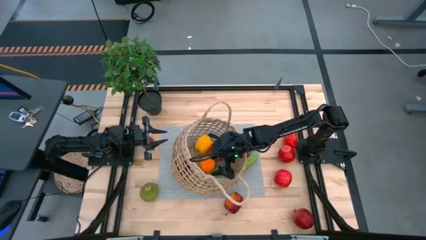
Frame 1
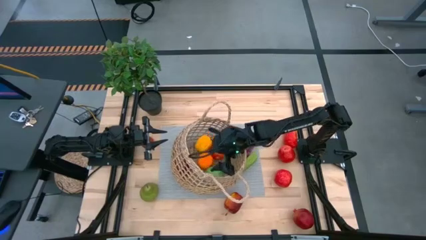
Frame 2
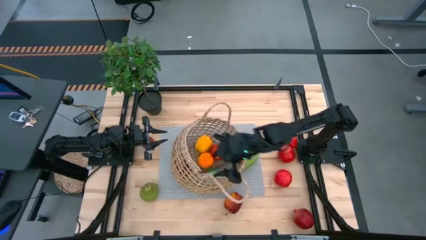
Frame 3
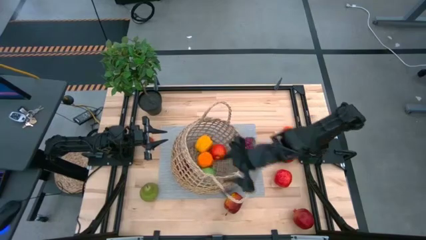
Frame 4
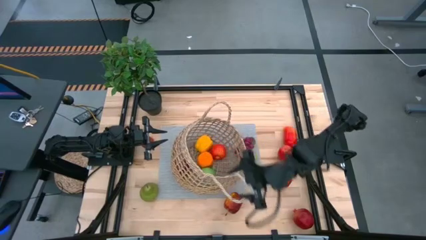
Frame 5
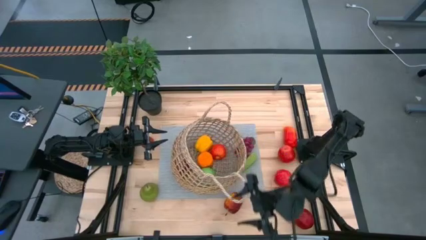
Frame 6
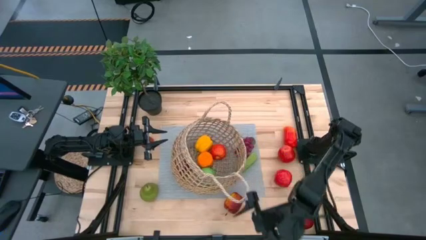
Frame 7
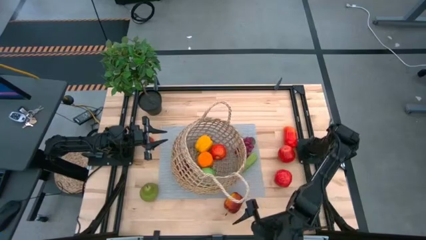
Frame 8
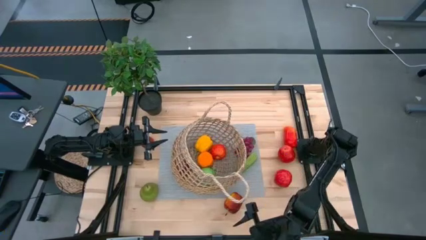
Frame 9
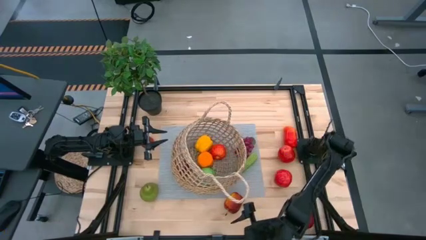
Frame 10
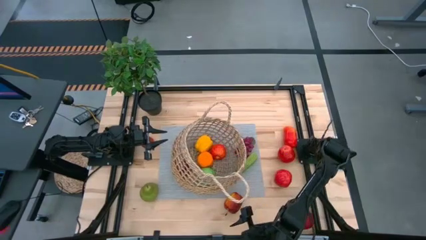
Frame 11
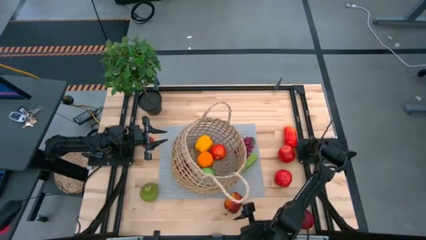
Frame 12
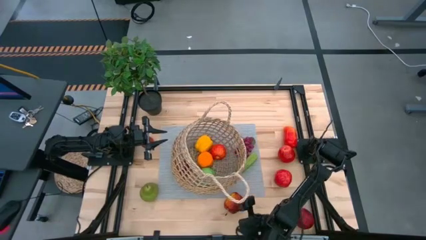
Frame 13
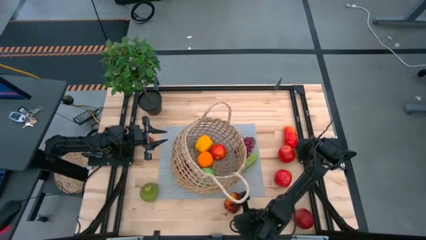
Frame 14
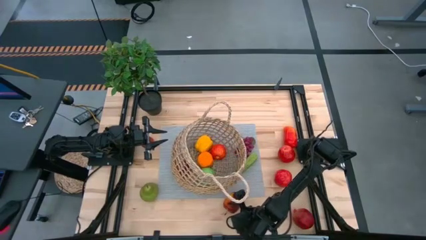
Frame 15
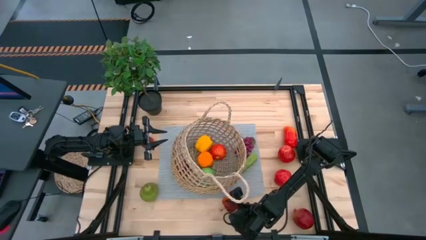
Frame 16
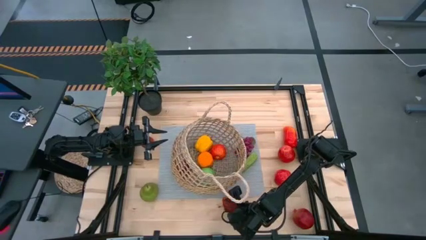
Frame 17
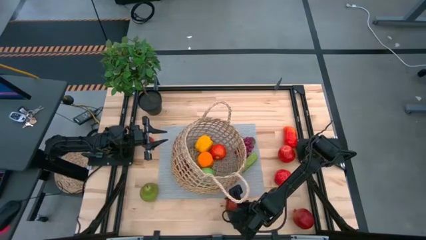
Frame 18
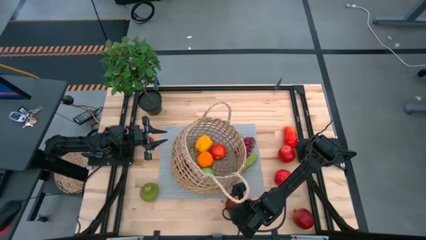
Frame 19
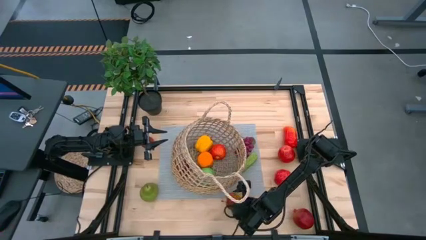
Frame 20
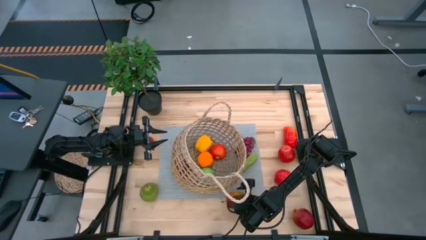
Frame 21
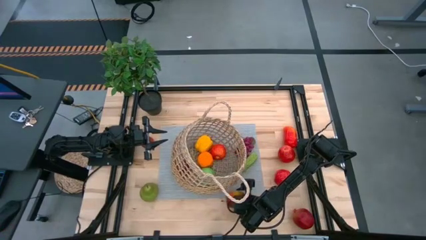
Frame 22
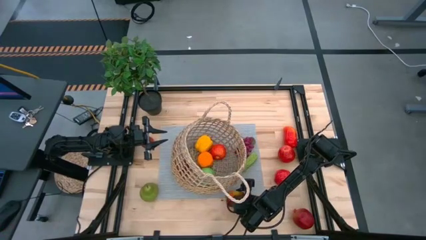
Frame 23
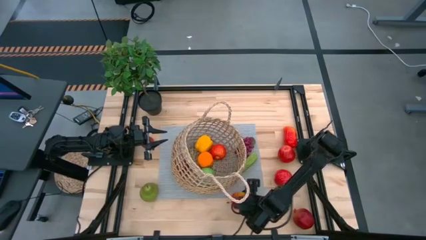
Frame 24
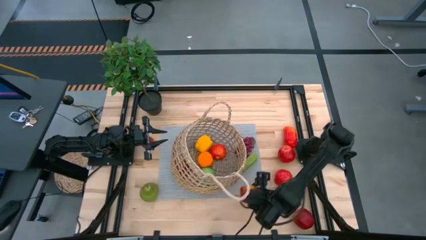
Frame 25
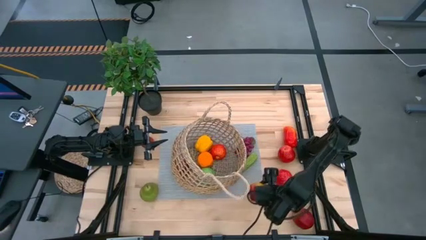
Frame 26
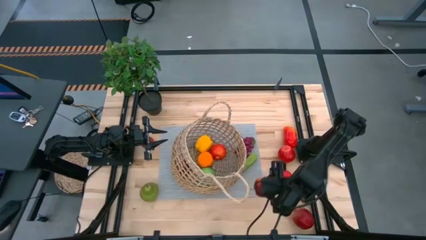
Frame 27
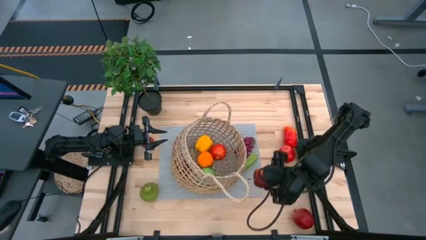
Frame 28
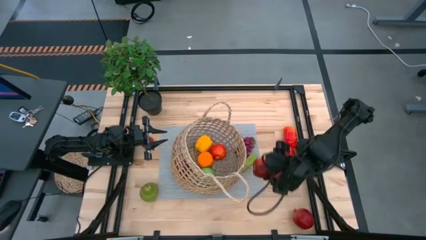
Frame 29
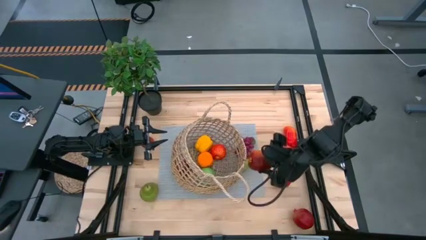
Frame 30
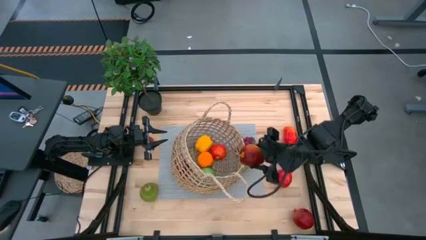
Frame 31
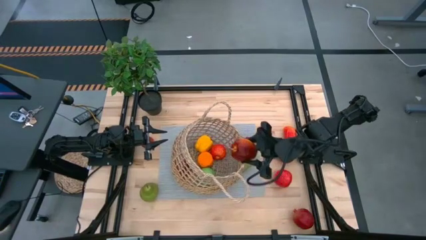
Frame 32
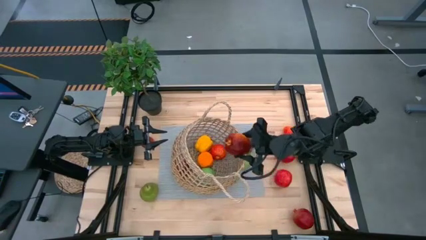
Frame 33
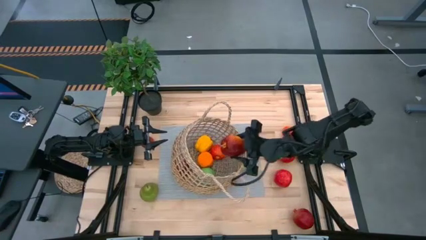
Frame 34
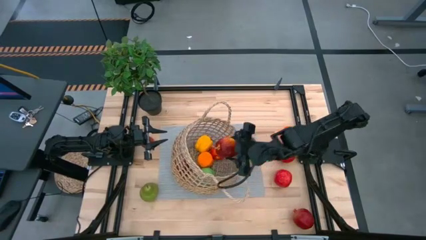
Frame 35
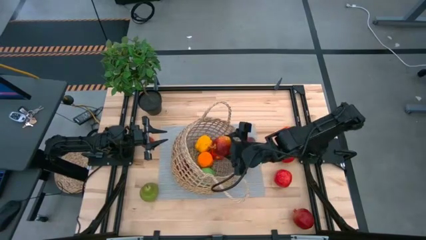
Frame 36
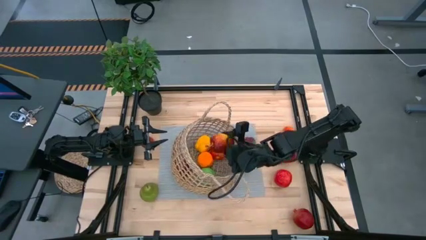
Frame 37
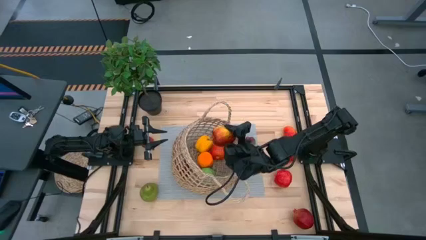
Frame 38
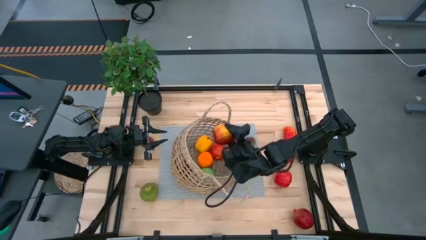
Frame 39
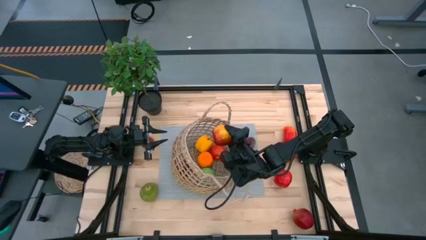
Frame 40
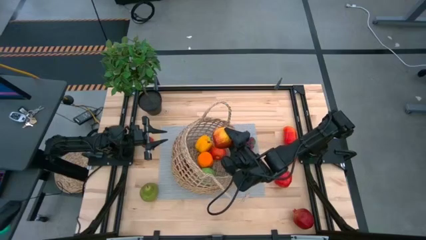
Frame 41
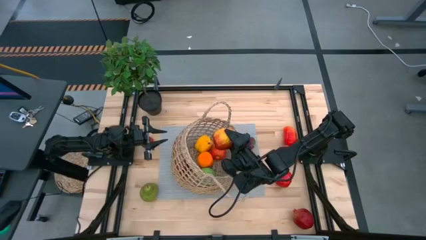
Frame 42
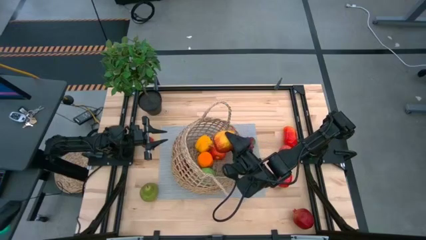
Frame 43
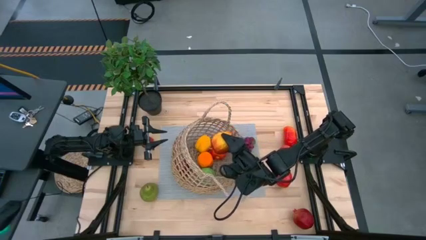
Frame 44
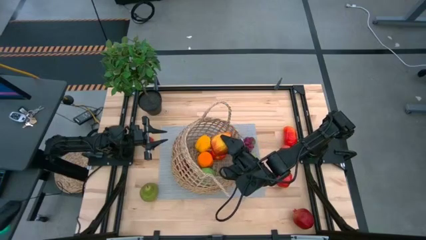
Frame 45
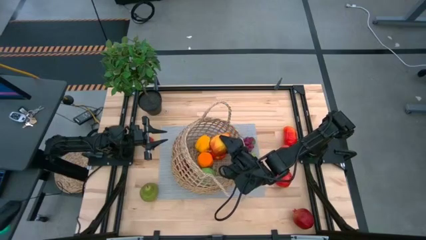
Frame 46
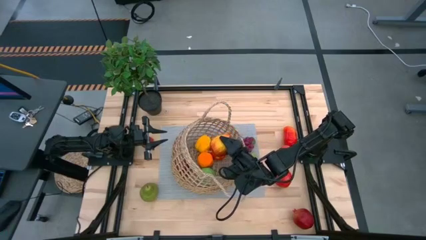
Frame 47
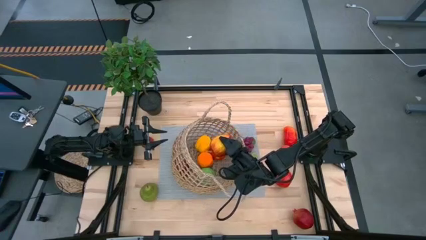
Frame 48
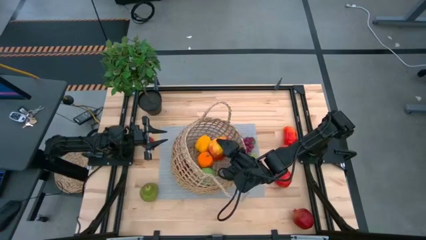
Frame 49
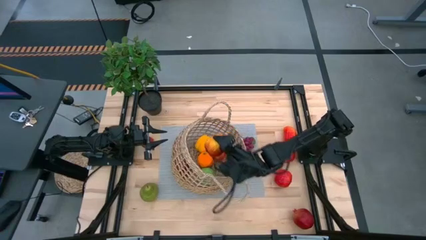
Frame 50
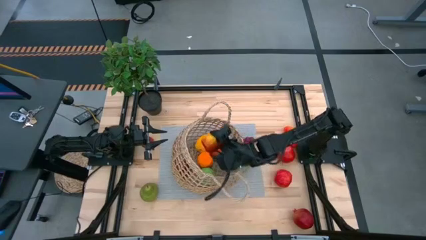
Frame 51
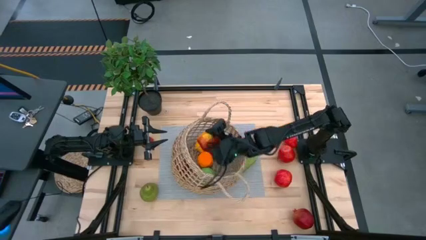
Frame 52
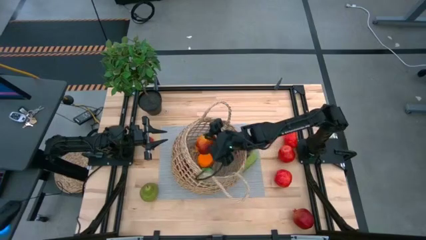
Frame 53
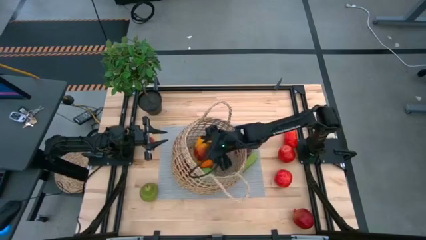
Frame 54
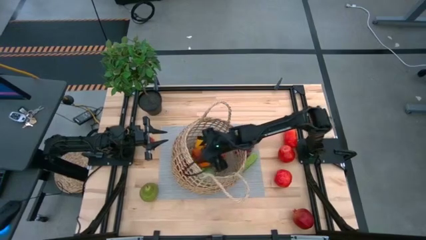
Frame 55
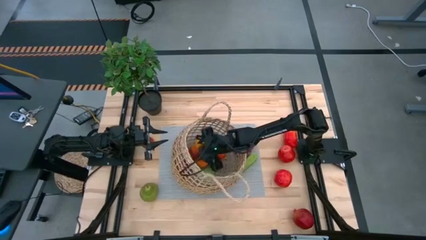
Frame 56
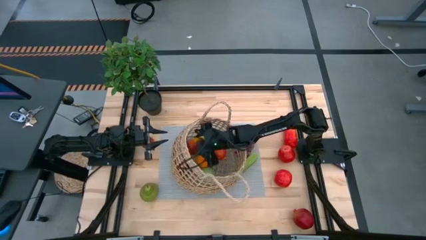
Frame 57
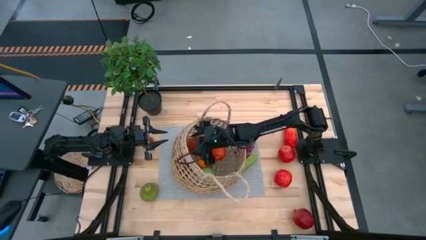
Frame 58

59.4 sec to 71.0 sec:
Task: Build produce basket
Put the dark red apple into the brown basket

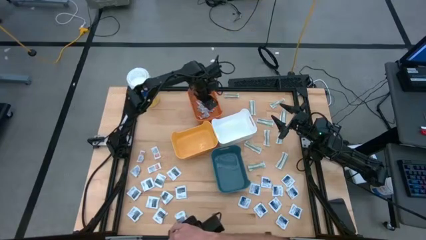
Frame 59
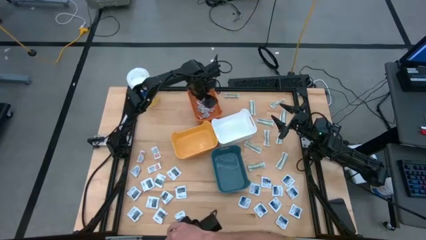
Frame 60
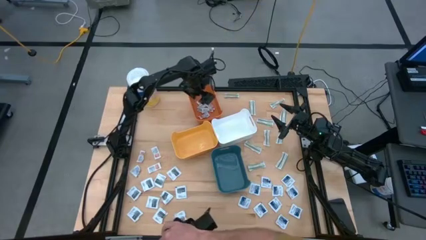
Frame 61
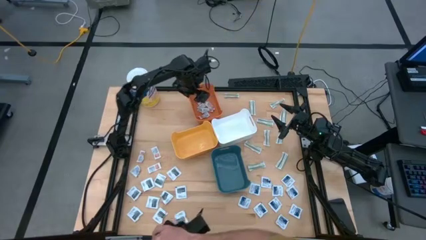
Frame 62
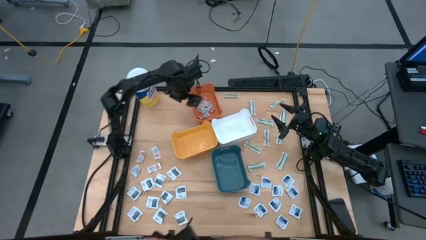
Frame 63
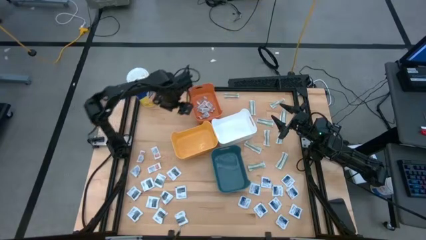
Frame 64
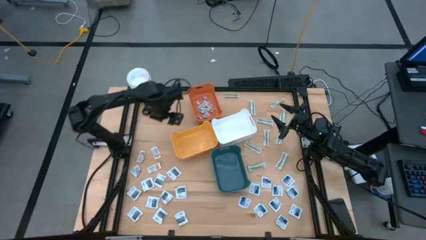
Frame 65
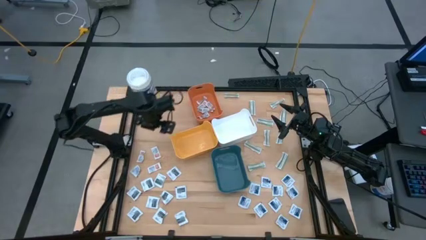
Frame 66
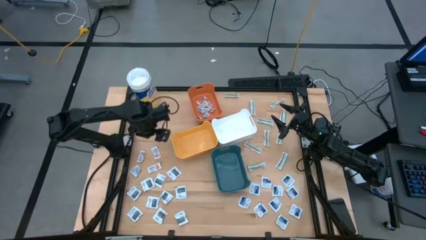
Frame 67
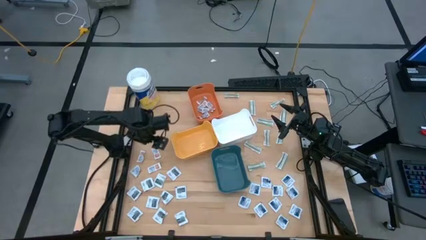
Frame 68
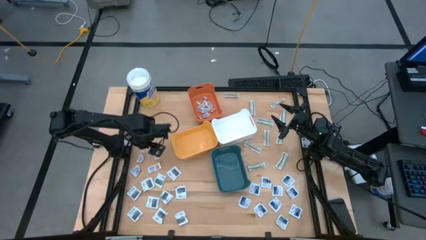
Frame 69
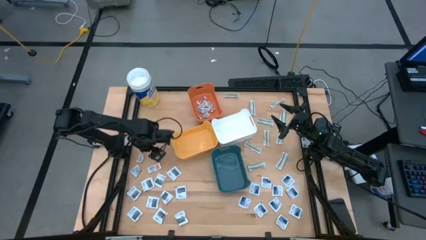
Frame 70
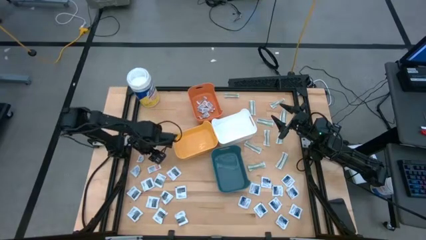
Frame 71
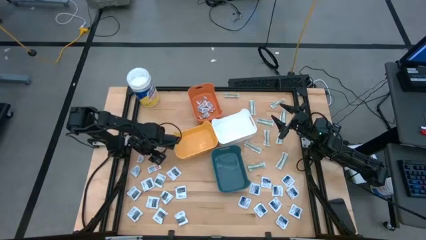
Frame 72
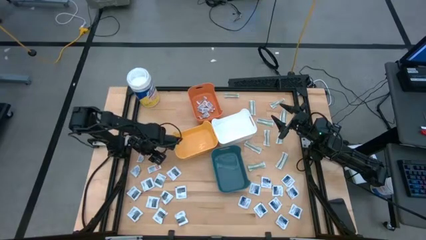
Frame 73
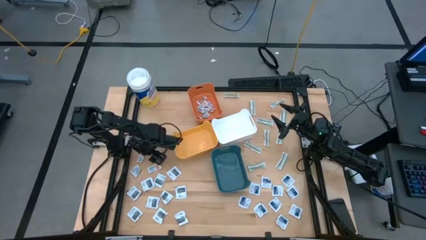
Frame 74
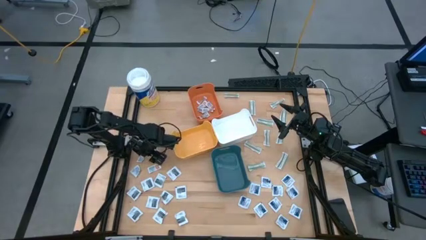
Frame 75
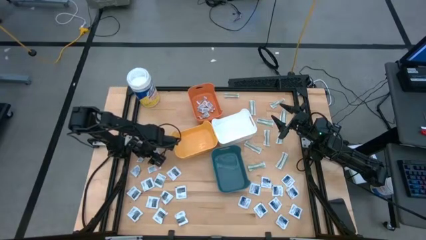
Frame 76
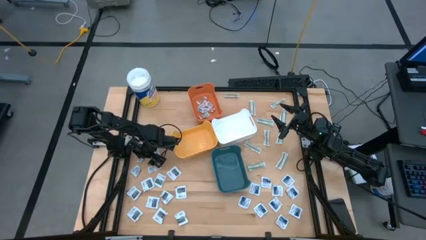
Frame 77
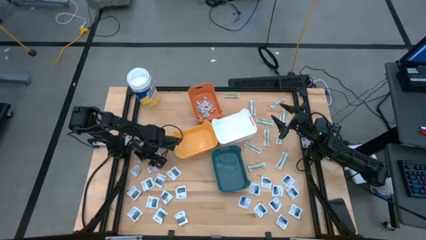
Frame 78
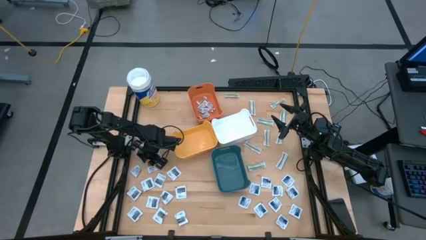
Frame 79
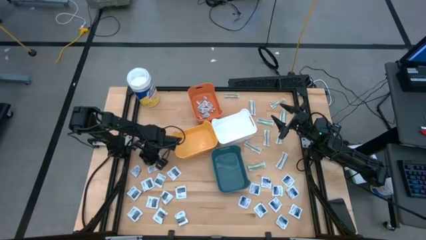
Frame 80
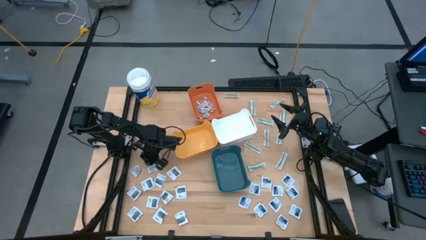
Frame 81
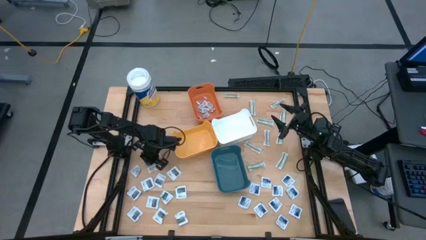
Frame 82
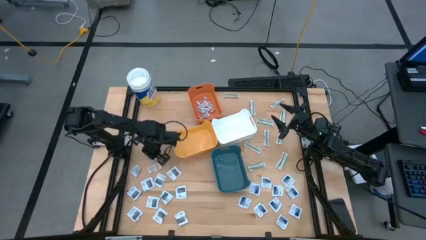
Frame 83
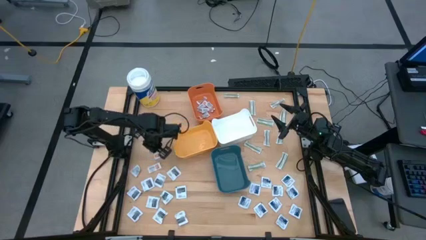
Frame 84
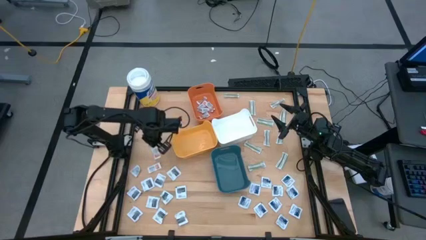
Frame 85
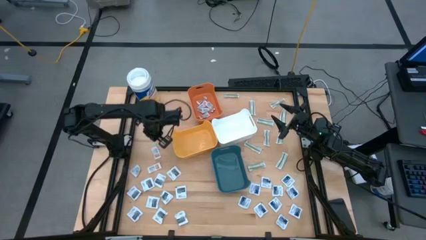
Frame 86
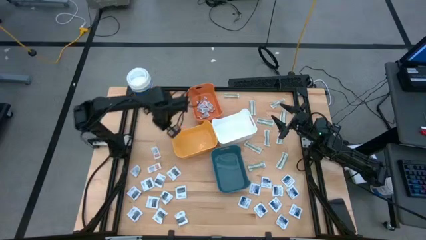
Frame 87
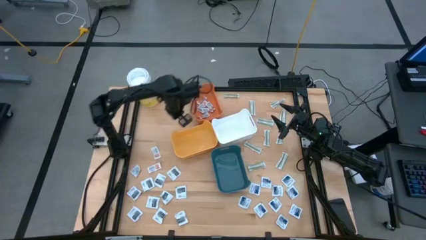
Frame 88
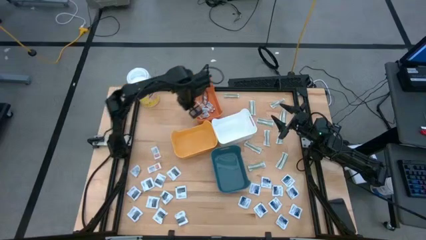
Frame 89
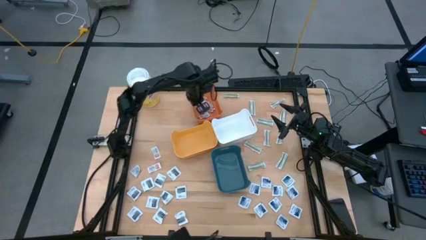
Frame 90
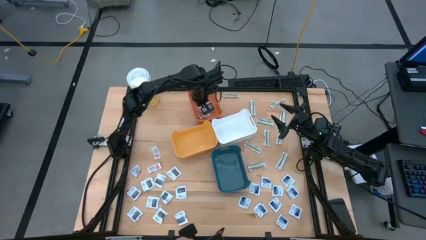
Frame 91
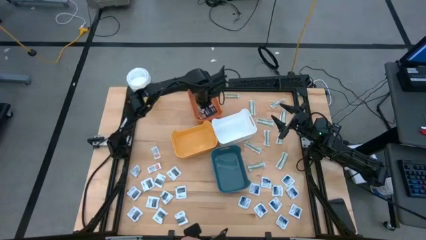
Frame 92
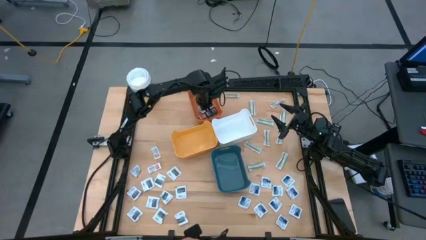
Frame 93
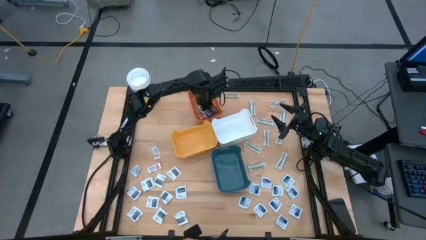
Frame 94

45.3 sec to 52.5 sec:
Task: Pick & Place First Aid Supplies
Put the orange ointment pack into the orange bin
